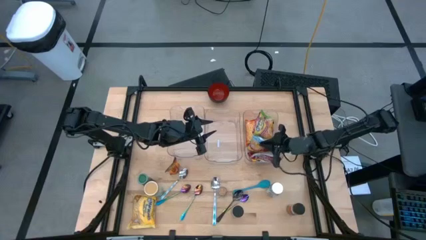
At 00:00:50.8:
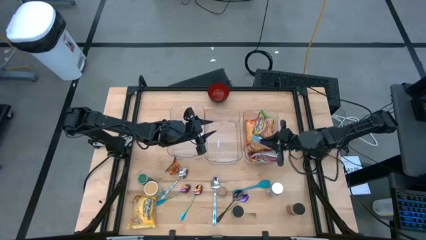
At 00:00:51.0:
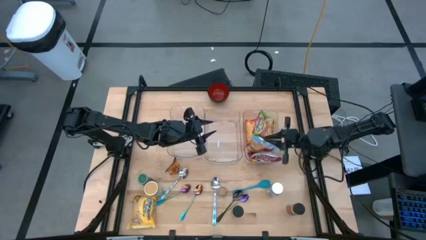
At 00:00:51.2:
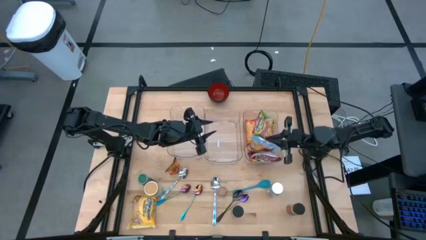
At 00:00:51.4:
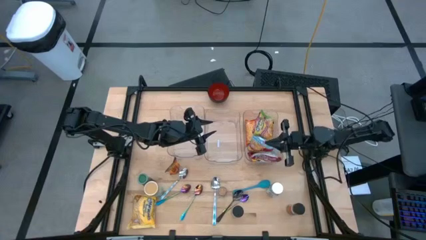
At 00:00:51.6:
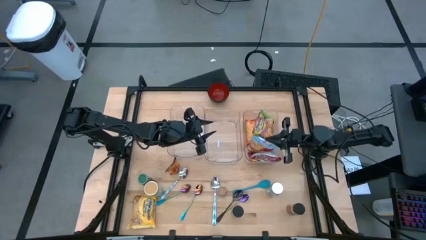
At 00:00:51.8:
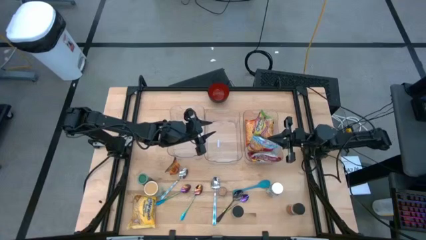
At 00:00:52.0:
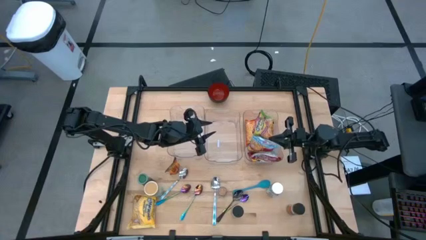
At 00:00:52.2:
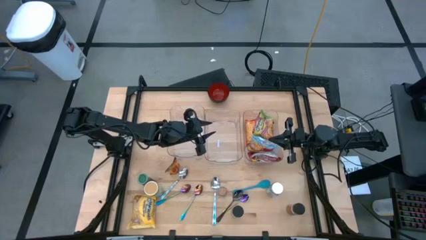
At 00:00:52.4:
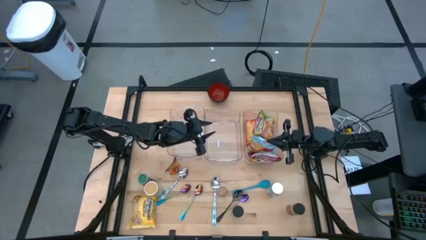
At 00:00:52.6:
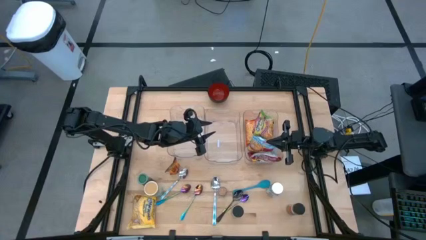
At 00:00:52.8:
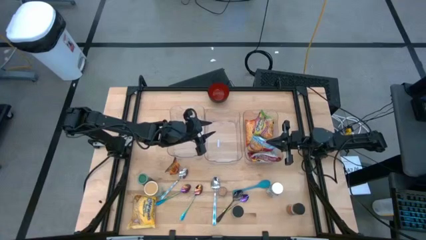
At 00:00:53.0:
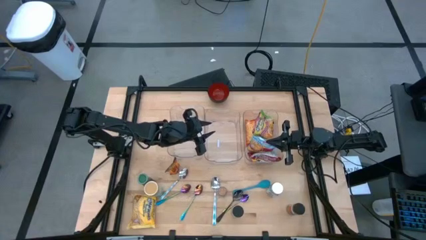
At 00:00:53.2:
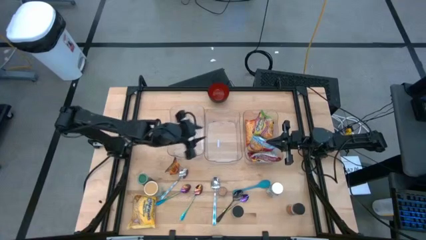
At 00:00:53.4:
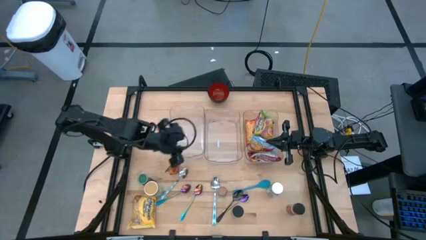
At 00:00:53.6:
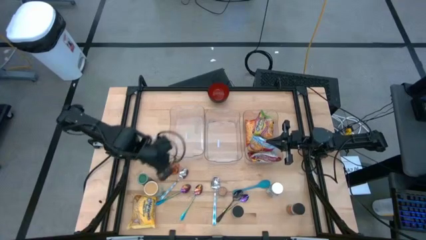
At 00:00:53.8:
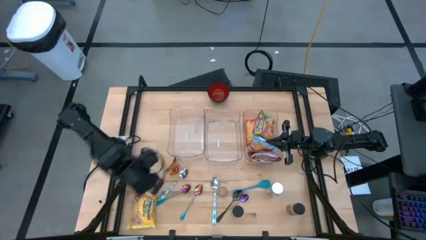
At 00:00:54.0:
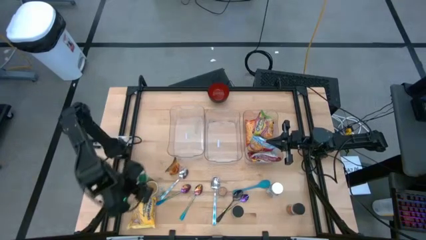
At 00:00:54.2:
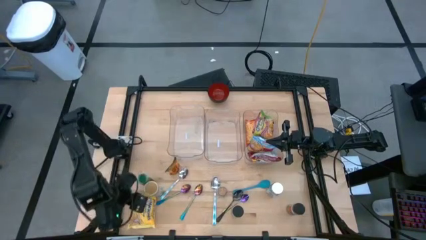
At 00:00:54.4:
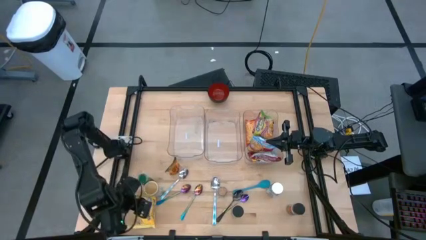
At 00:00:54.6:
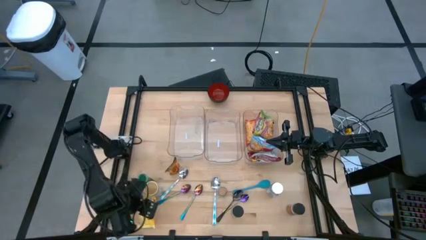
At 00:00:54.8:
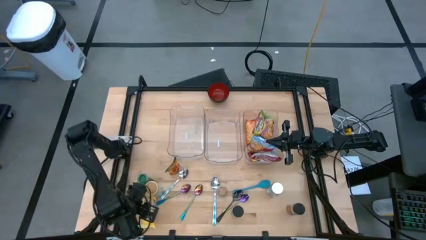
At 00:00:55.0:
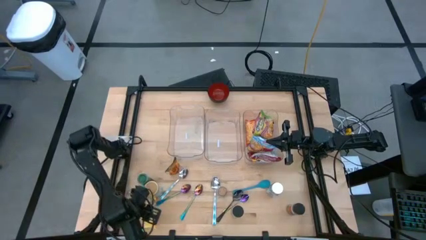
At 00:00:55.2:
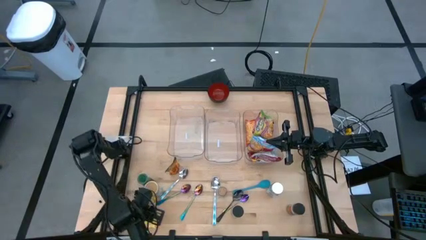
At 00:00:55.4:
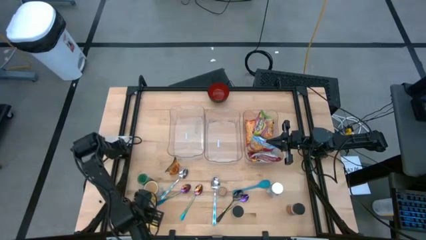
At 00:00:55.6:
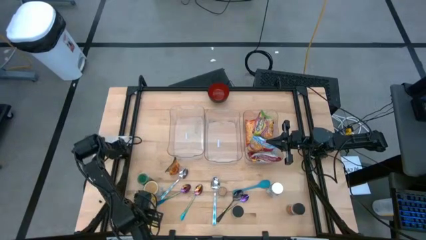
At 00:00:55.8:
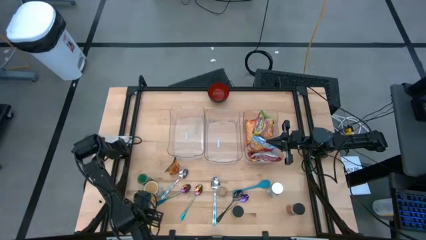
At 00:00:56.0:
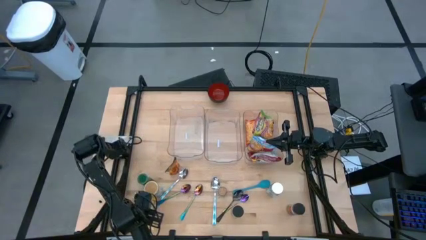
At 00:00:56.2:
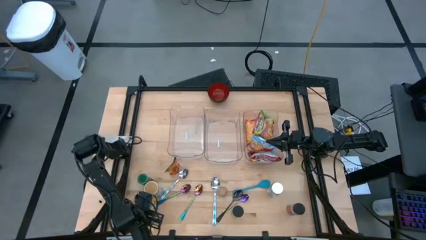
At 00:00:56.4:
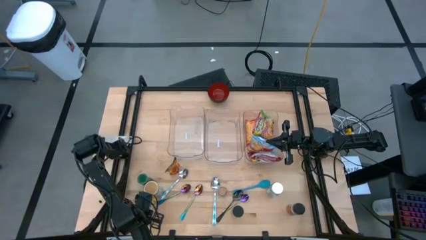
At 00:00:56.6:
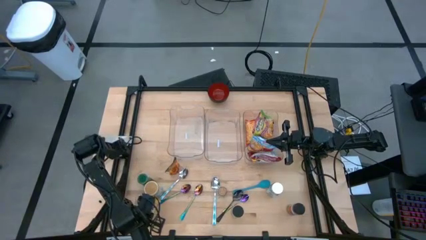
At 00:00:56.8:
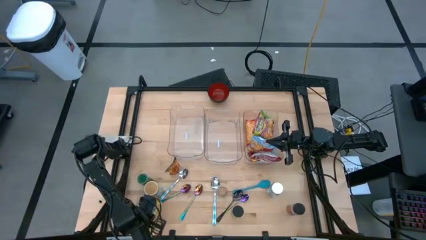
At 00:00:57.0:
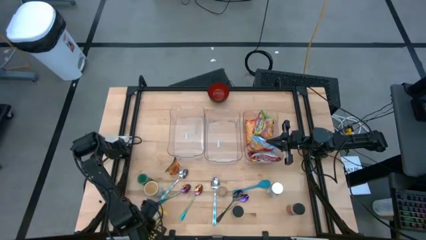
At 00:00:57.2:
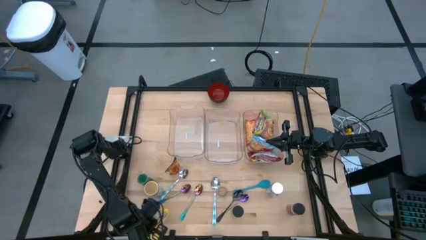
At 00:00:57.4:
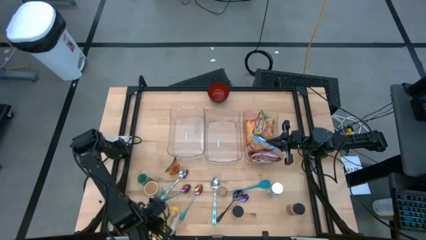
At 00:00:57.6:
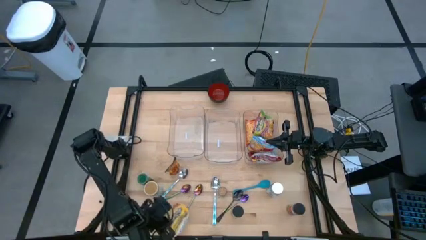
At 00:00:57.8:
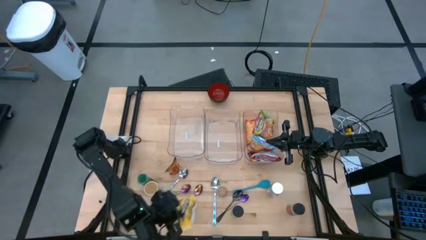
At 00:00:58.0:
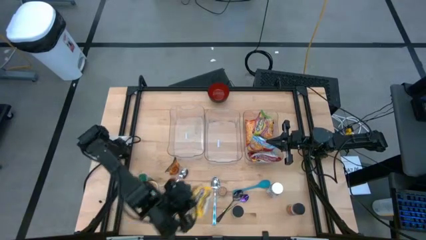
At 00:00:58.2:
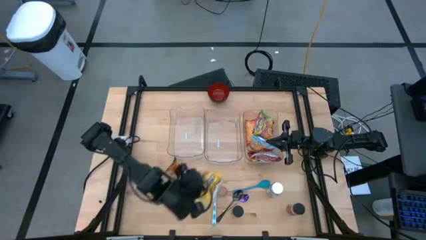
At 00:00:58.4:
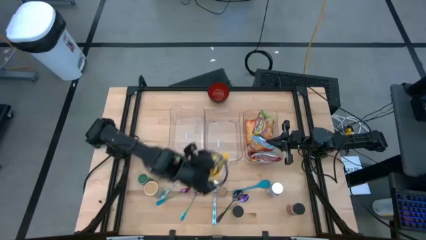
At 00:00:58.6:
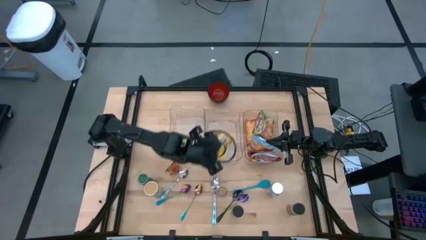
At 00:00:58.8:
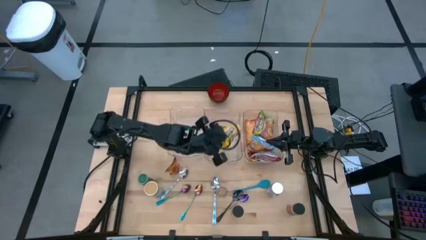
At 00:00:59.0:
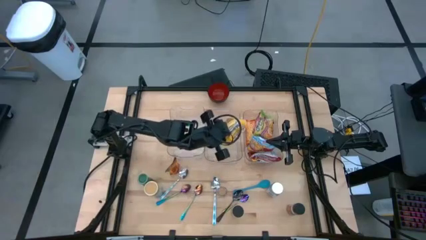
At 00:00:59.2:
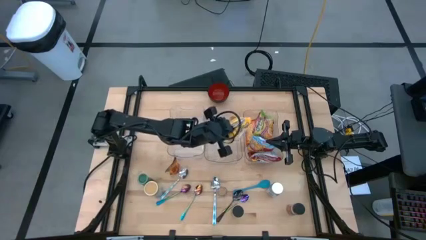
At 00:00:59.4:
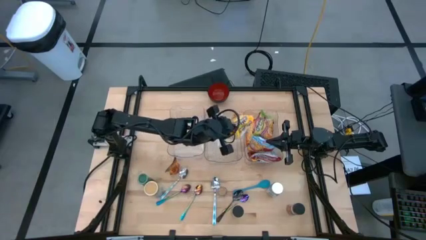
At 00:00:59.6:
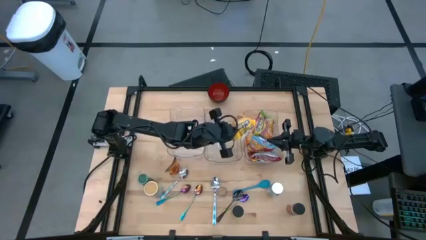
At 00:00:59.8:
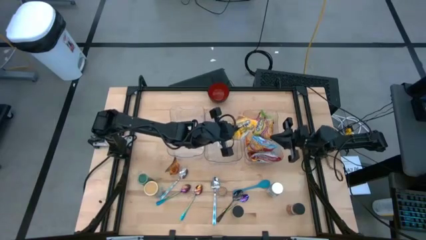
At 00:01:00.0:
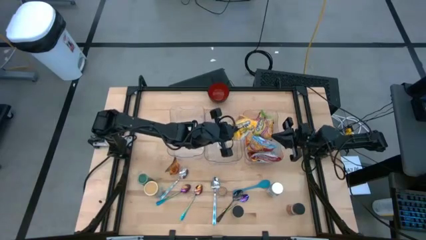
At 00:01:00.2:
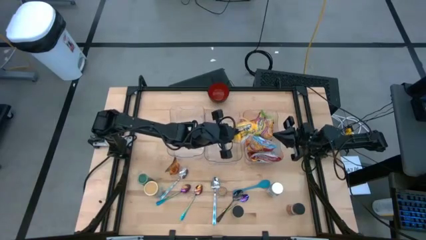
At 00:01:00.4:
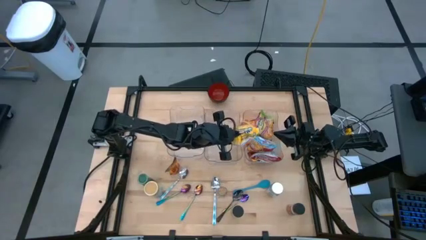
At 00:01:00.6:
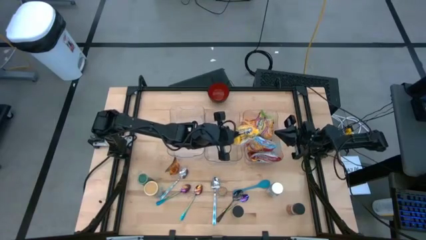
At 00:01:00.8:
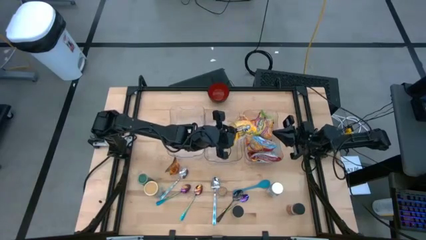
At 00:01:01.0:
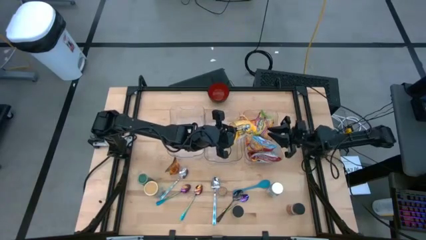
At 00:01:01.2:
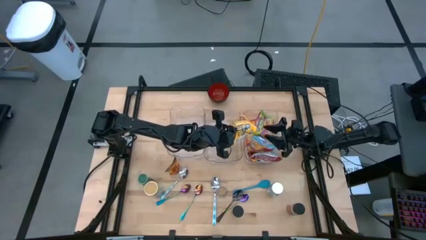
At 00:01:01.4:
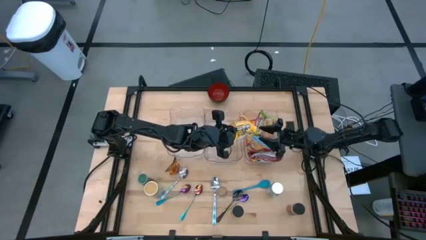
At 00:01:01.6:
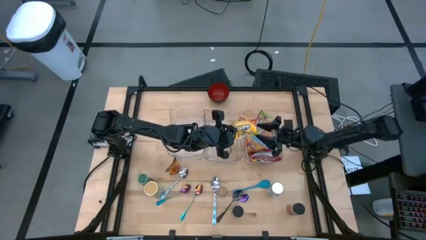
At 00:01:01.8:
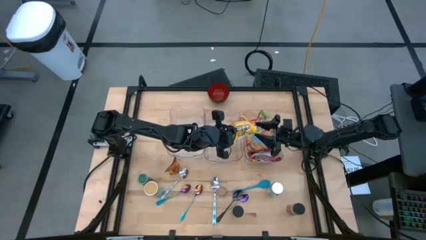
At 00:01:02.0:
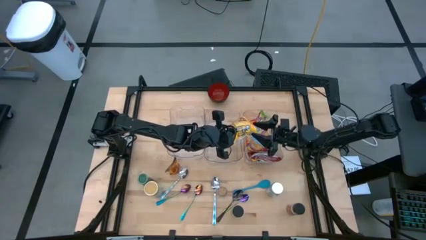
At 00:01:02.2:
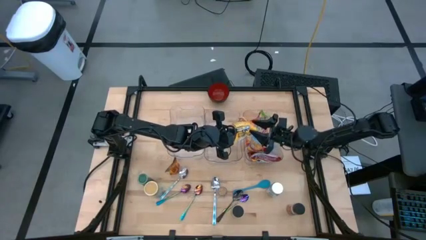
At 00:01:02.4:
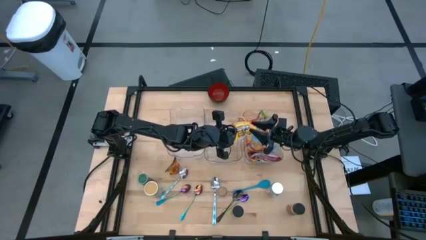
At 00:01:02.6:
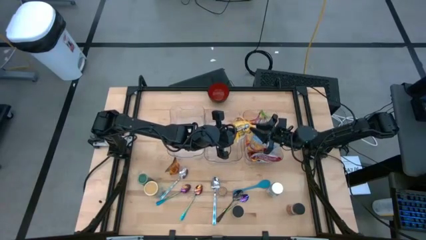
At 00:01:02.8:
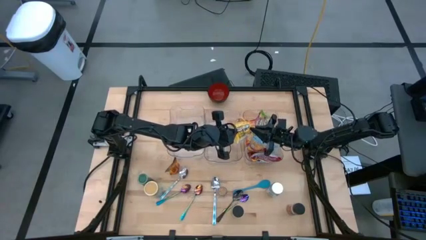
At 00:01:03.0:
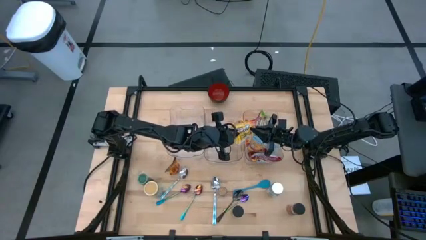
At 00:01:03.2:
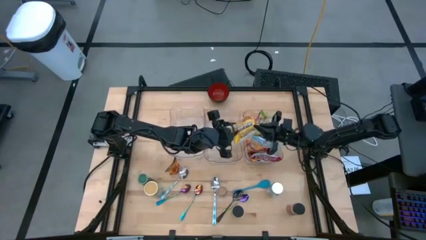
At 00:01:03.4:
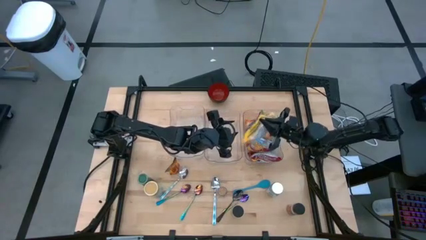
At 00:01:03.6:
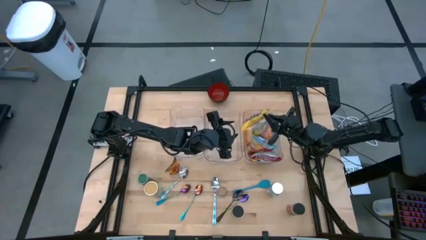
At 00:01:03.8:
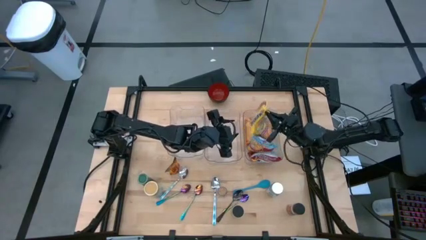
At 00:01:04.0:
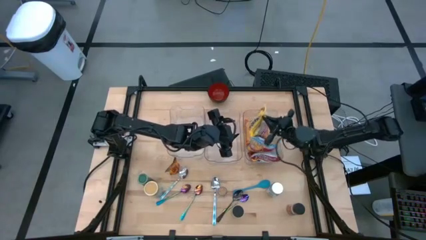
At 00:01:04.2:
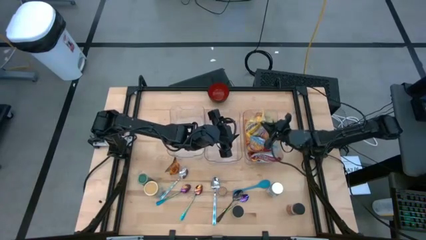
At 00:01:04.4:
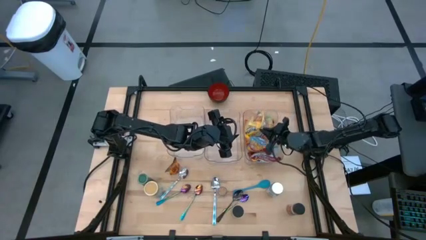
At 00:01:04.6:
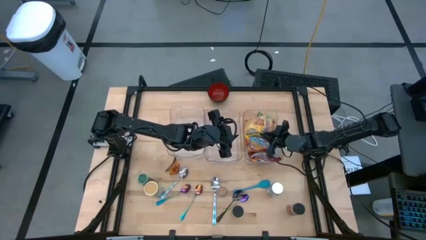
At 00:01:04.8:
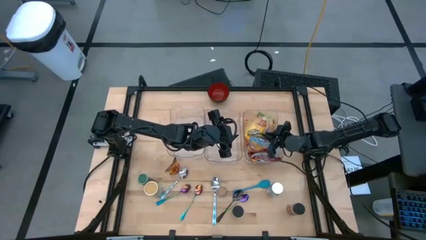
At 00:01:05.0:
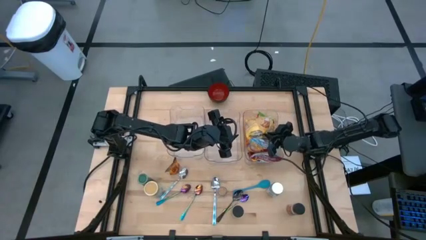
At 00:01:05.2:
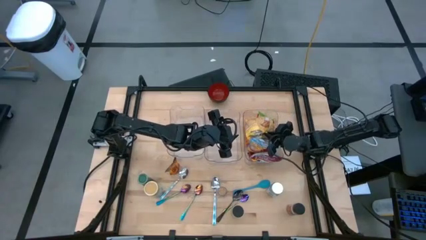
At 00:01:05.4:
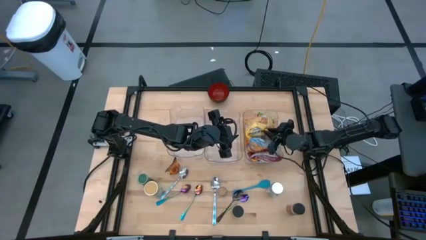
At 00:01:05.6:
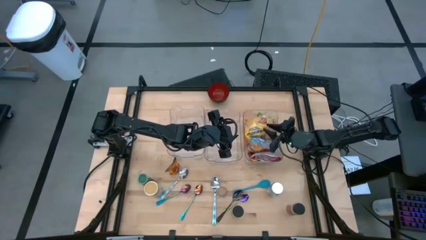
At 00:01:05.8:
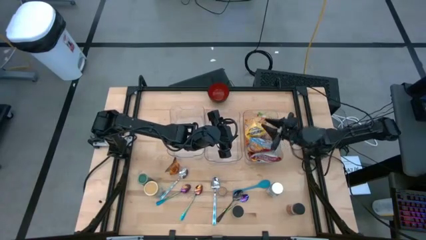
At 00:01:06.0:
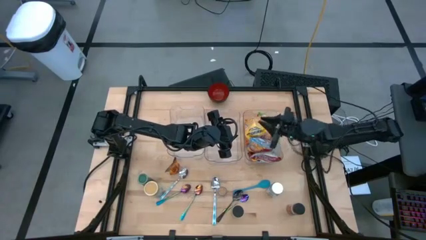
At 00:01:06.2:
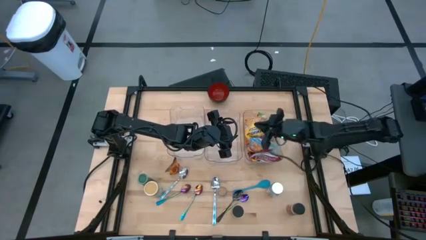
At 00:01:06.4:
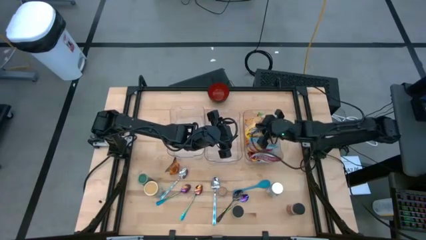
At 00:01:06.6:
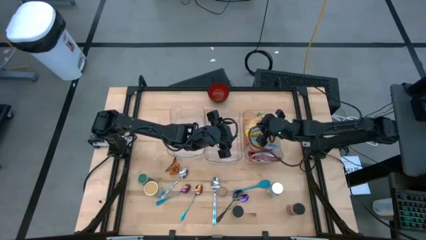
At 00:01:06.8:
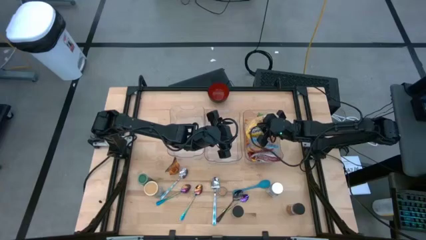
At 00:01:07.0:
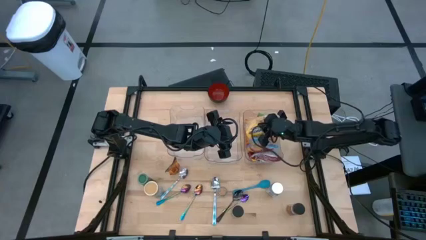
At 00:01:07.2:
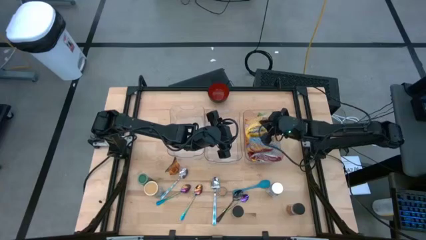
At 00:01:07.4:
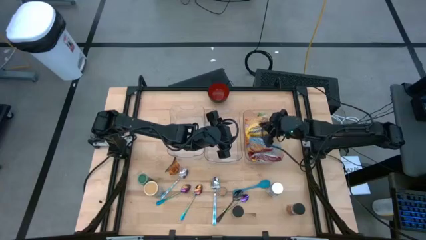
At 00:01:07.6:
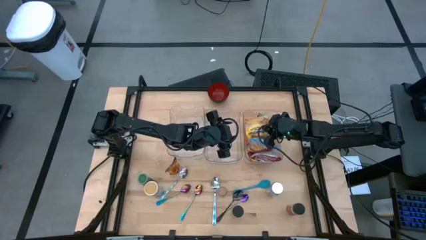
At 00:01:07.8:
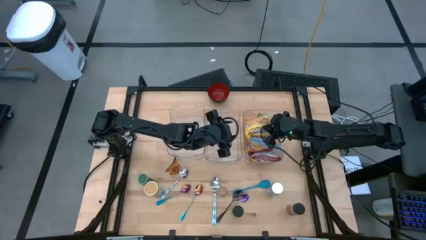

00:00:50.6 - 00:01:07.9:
Task: Pick & Place Food Item
Put the yellow noodle pack into the right transparent bin
